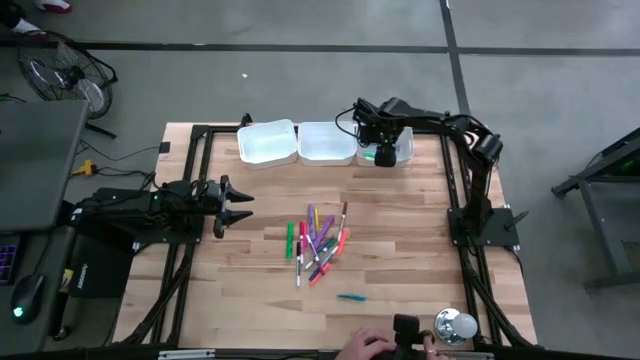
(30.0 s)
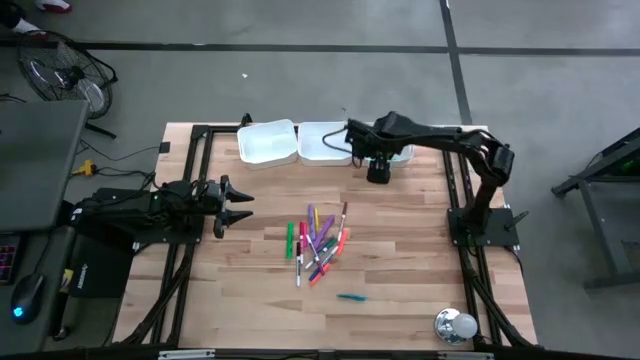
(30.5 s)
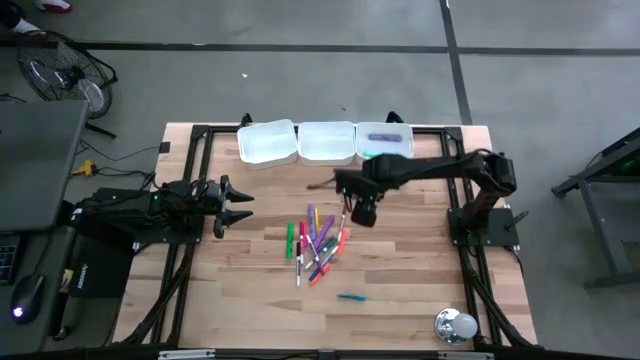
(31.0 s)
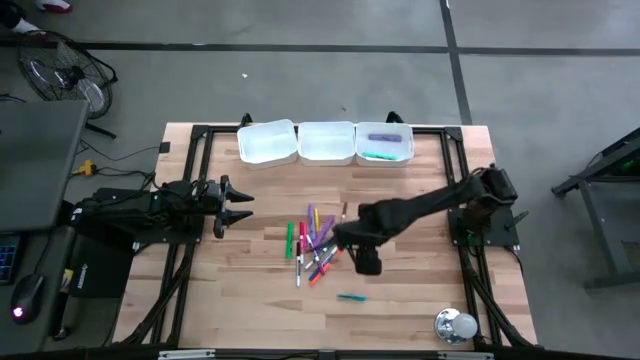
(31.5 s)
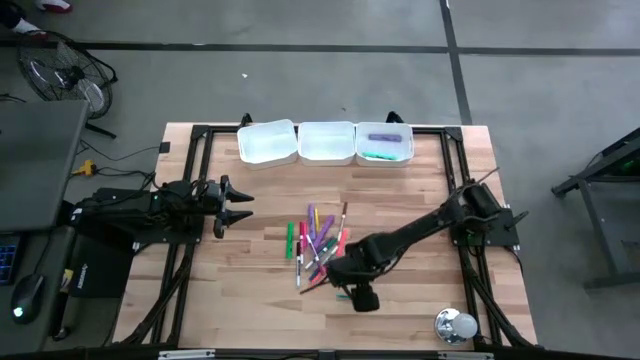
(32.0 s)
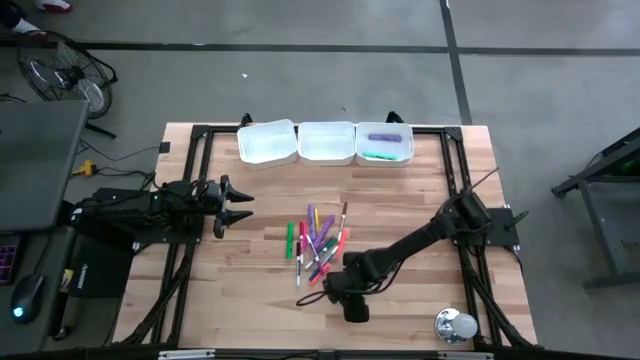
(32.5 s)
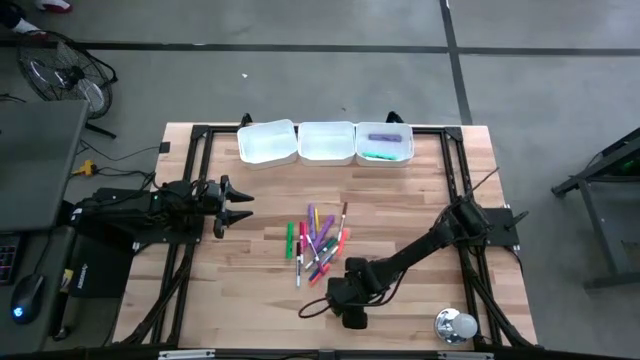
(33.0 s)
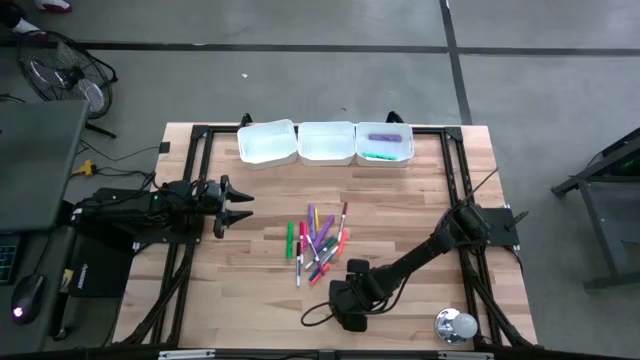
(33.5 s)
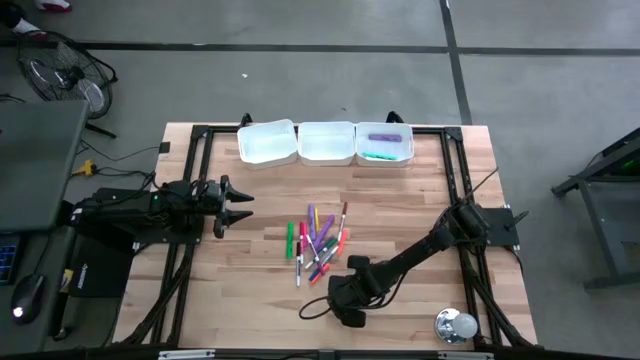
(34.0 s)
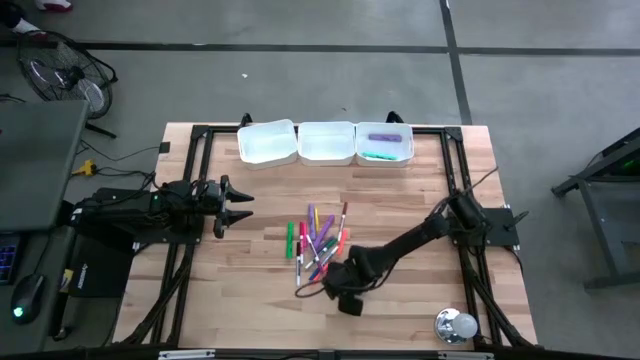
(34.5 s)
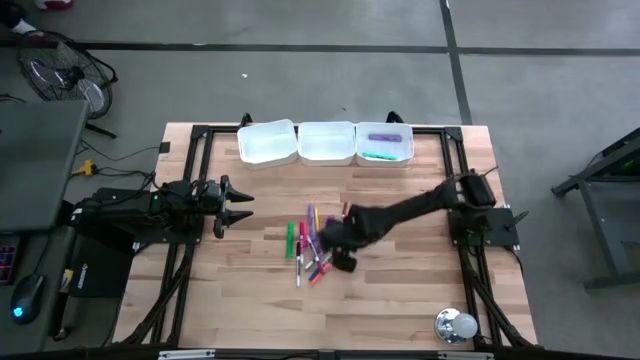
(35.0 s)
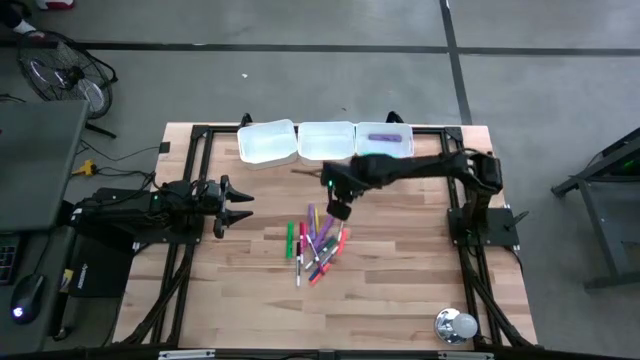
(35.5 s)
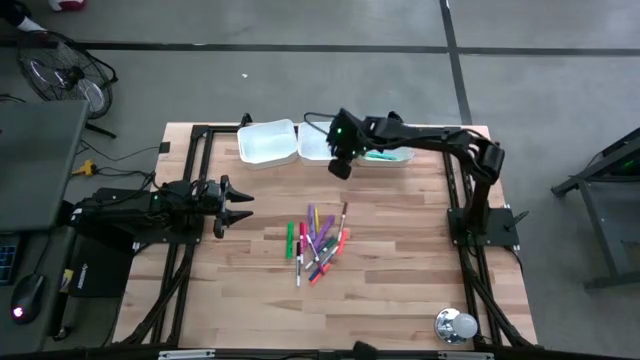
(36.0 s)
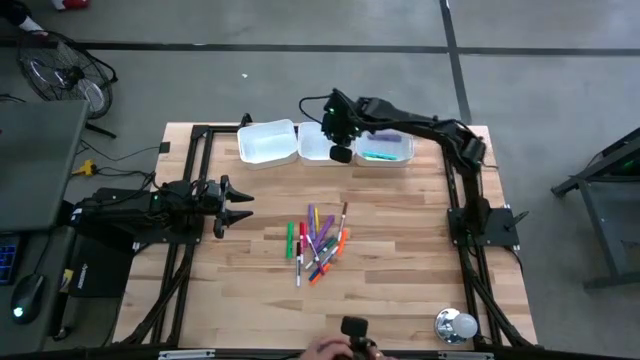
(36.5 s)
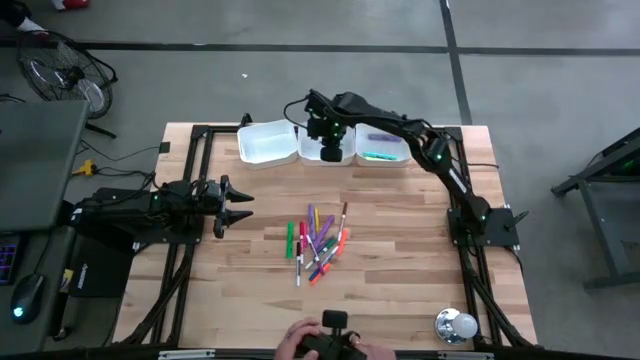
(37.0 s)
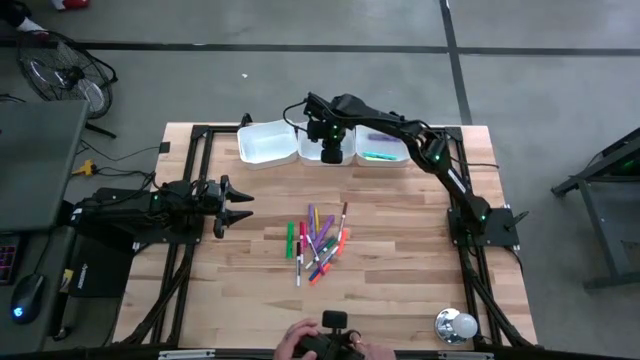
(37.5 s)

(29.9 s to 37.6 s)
Task: Pick & Place Markers
Put the blue pen into the middle white bin

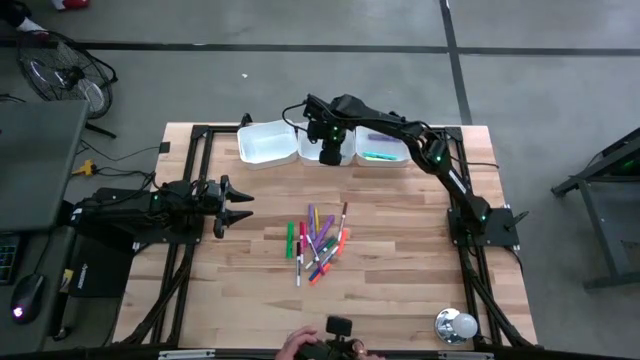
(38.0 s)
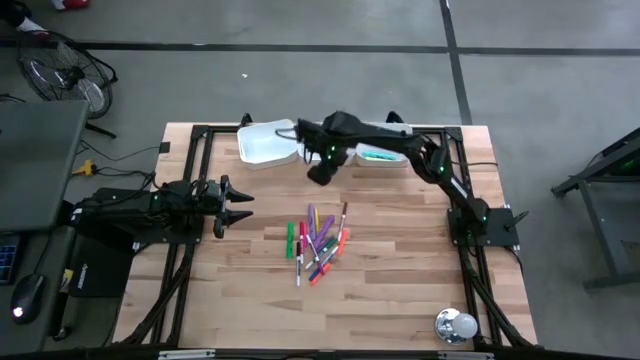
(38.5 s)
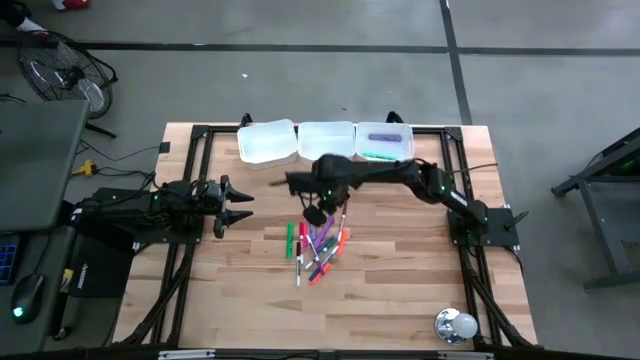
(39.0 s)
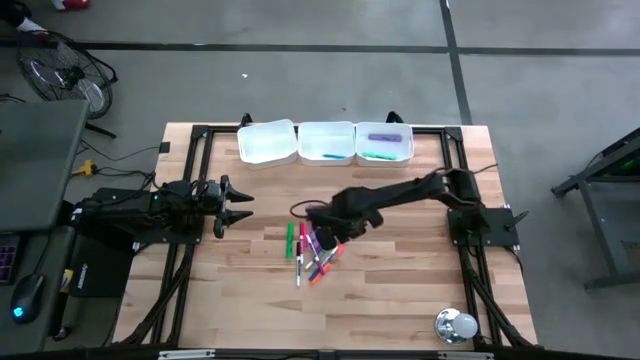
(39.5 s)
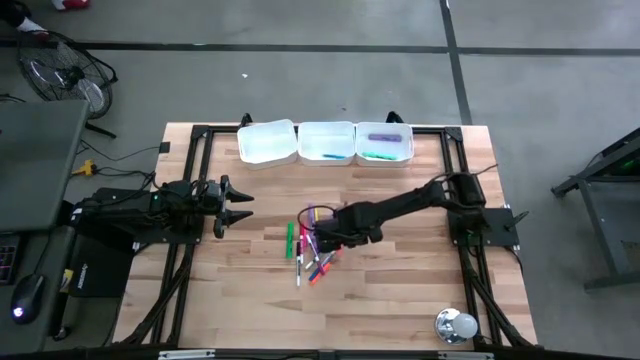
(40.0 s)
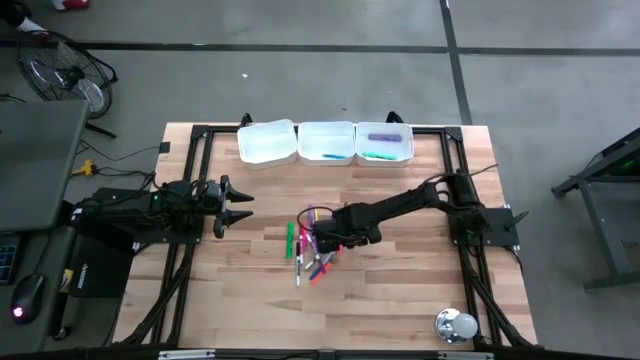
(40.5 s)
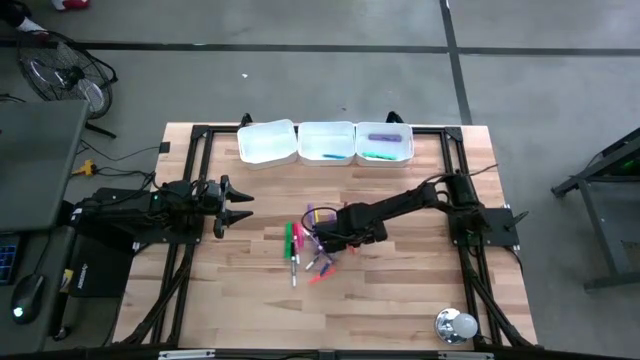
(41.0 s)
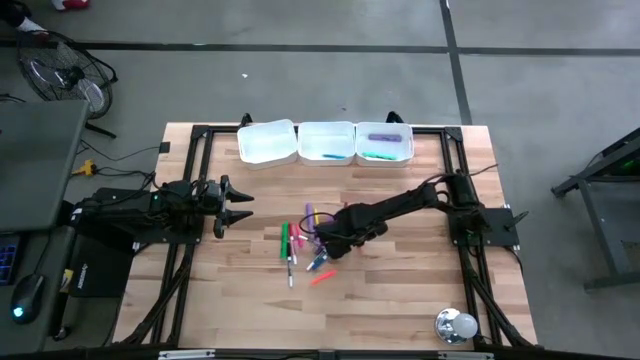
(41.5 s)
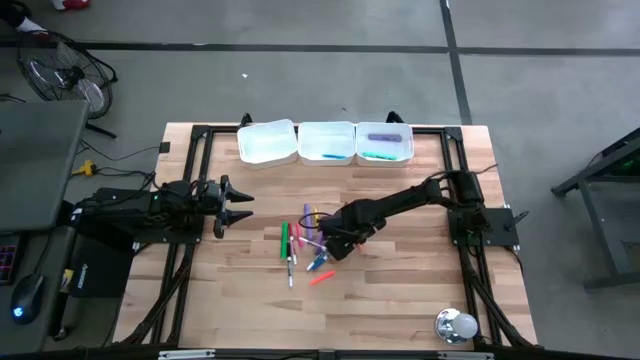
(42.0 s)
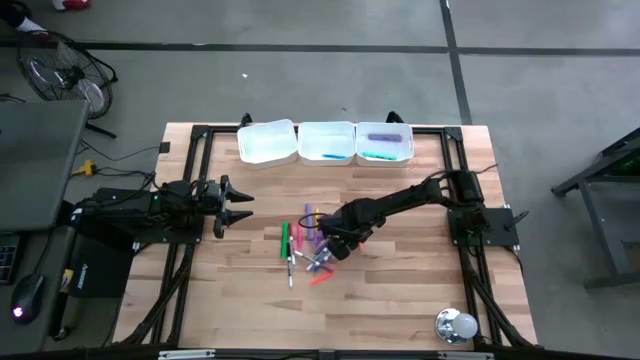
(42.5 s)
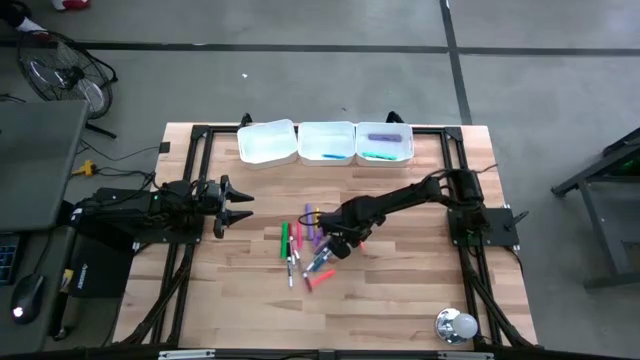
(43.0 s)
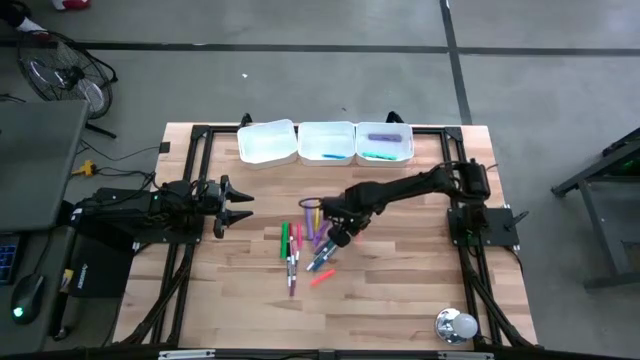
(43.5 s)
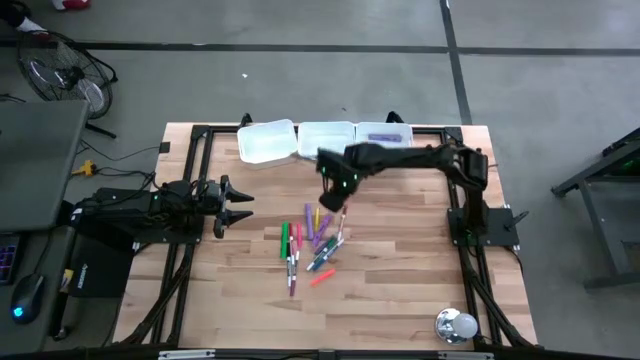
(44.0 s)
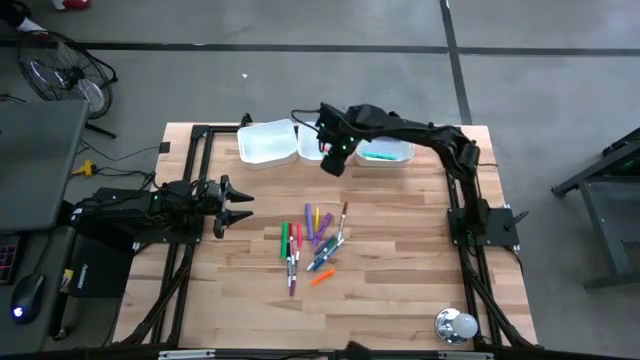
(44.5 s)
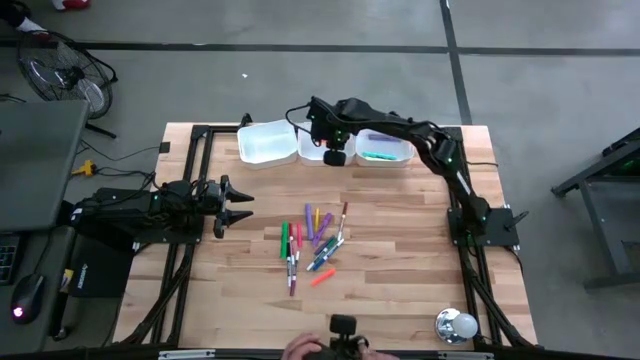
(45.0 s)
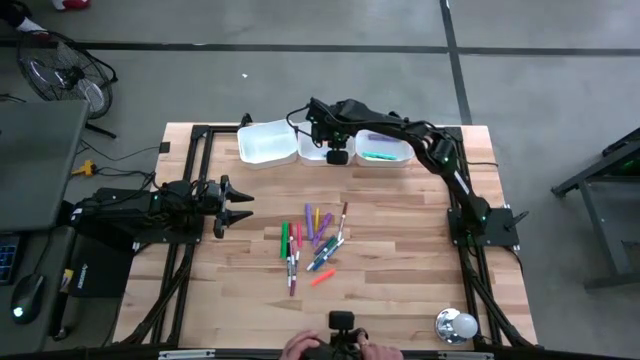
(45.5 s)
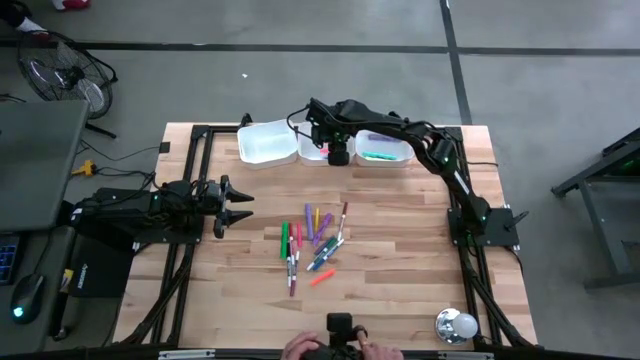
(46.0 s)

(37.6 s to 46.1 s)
Put the top orange pen into the middle white bin

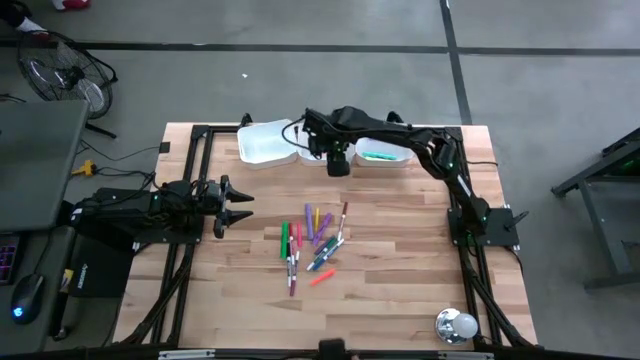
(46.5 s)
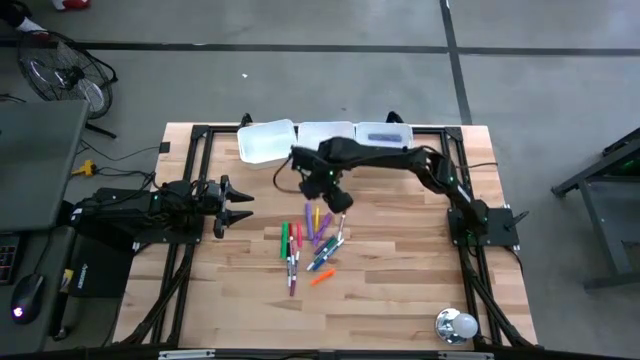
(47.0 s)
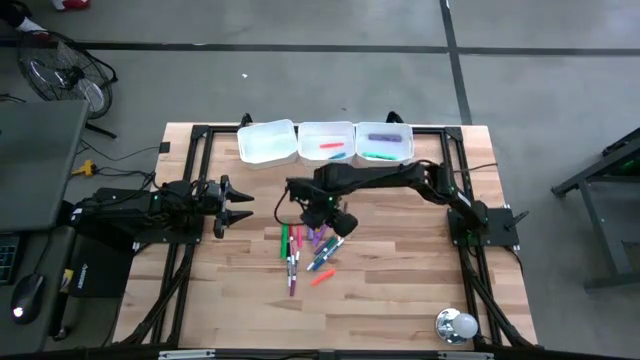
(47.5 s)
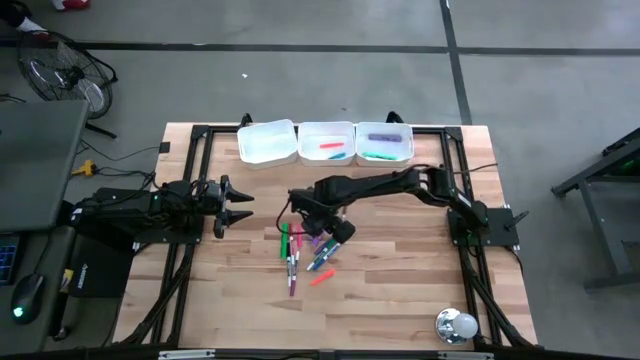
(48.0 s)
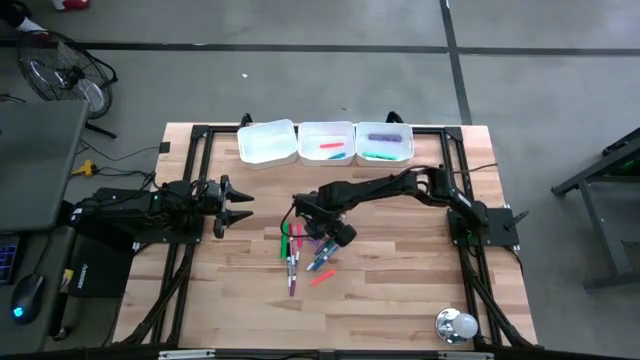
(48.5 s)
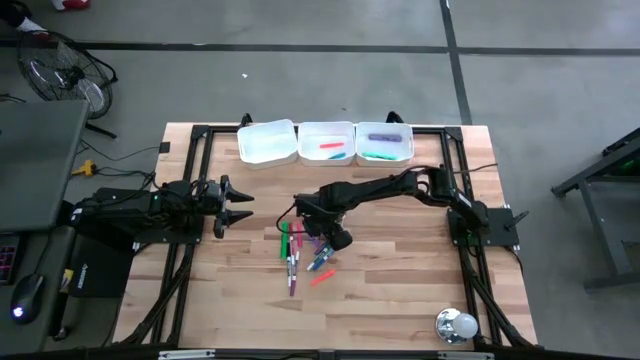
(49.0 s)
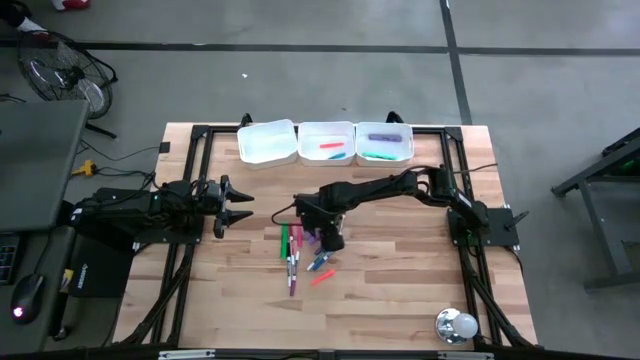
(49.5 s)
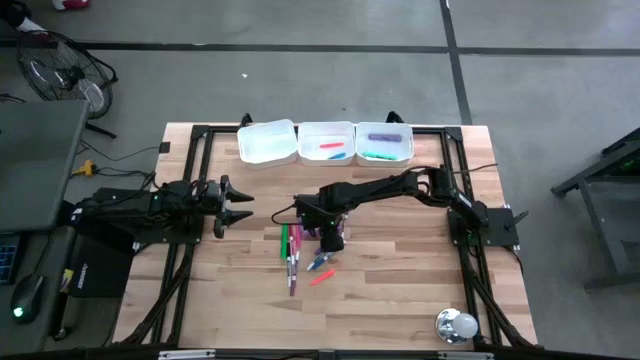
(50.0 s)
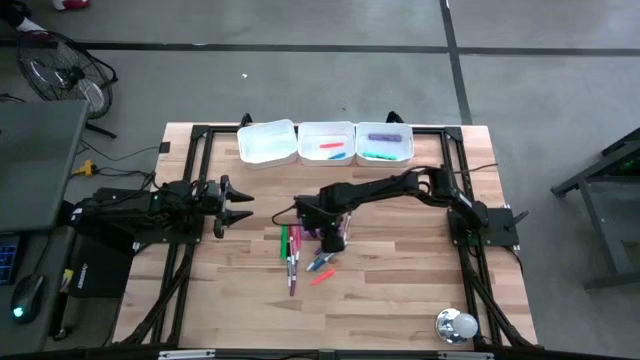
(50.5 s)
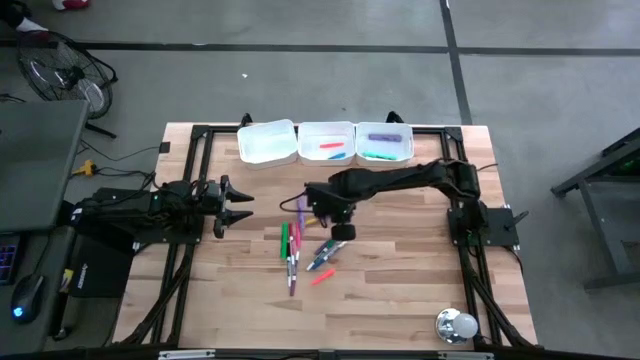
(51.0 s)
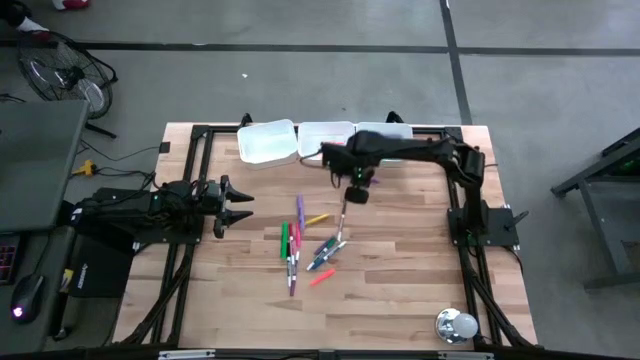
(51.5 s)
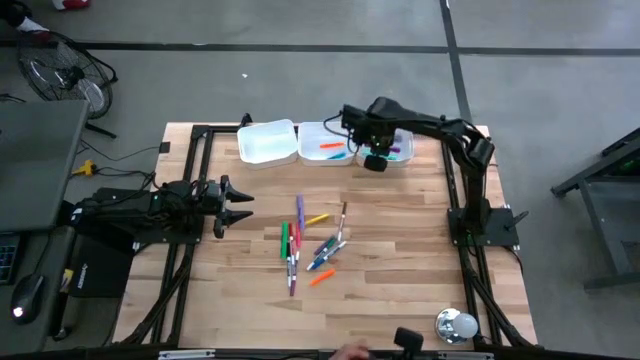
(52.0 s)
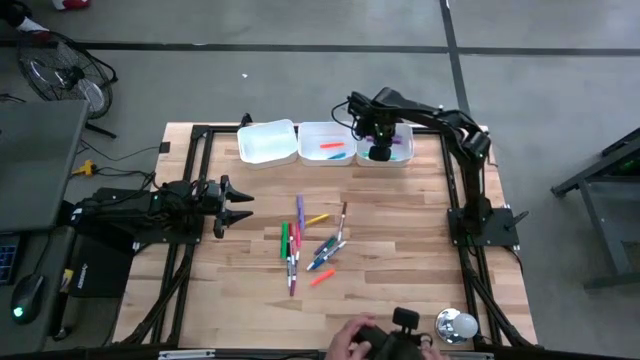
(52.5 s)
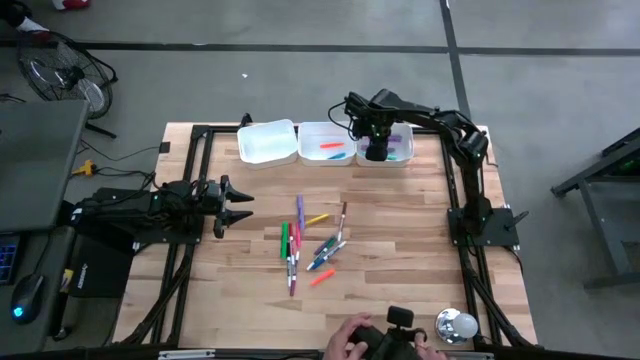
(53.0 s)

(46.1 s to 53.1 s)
Put the violet highlighter pen into the right white bin
